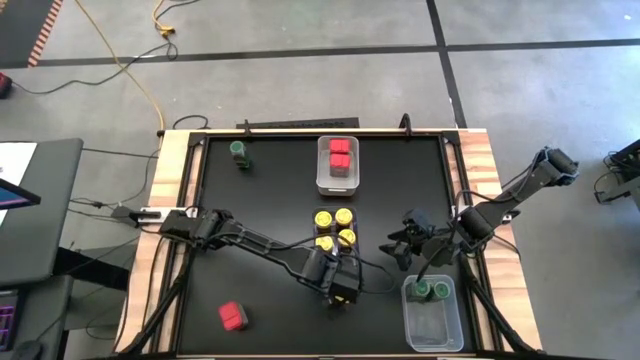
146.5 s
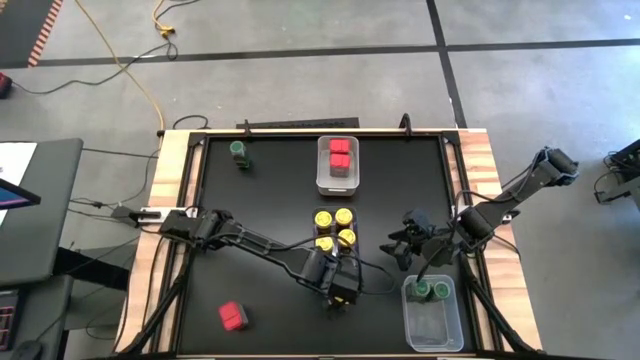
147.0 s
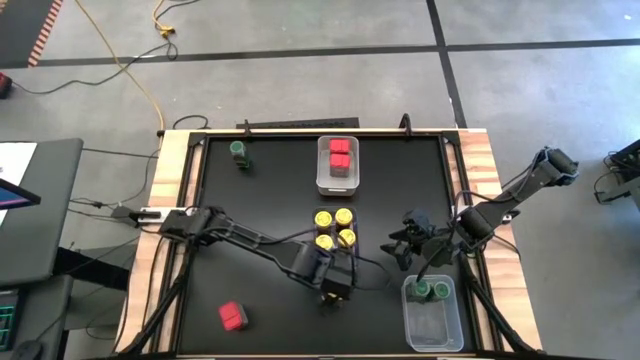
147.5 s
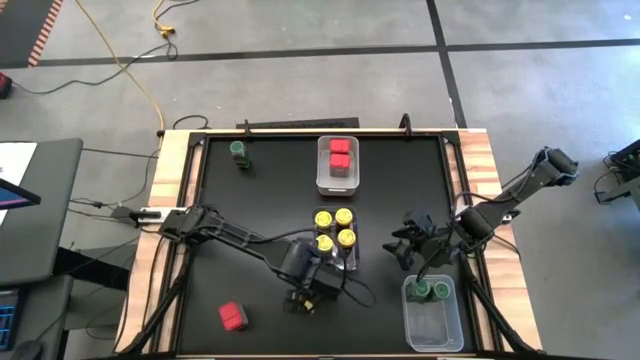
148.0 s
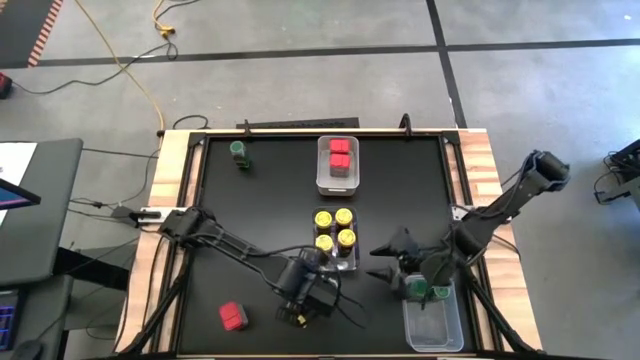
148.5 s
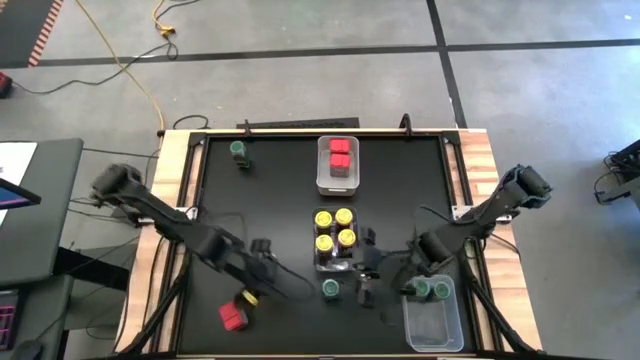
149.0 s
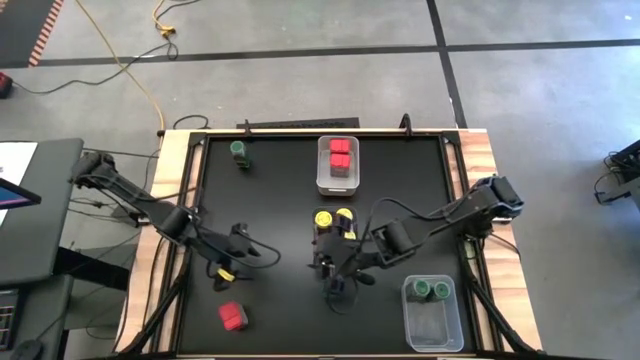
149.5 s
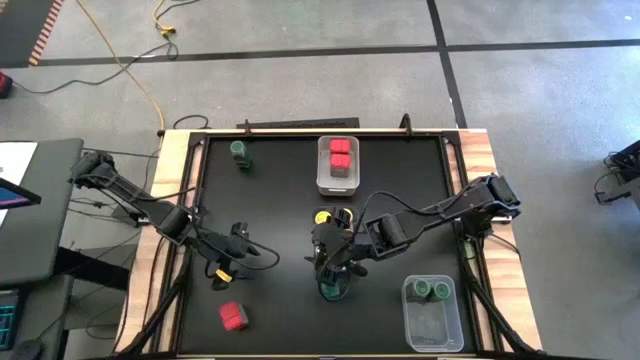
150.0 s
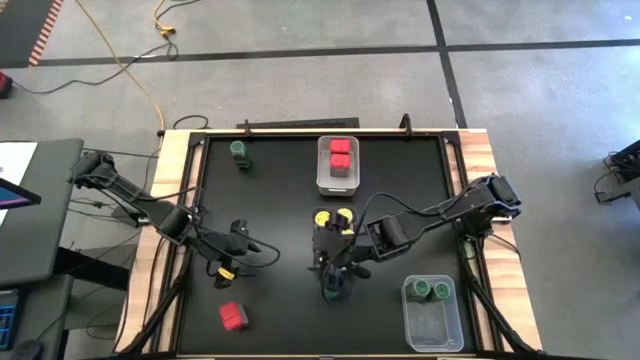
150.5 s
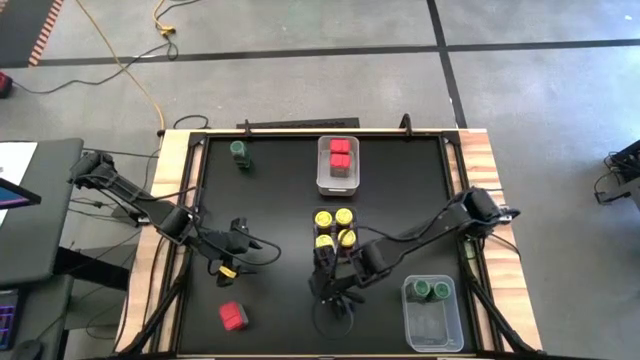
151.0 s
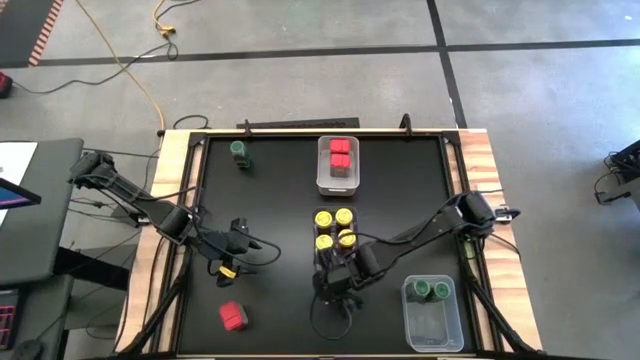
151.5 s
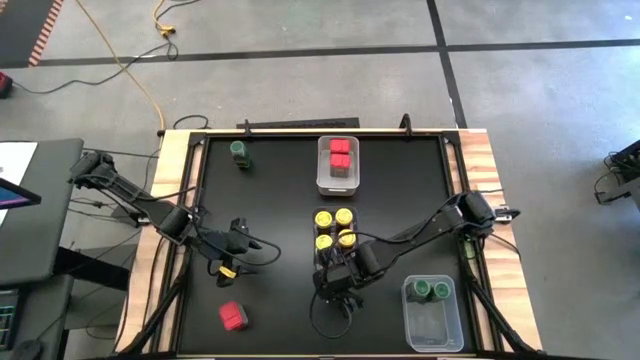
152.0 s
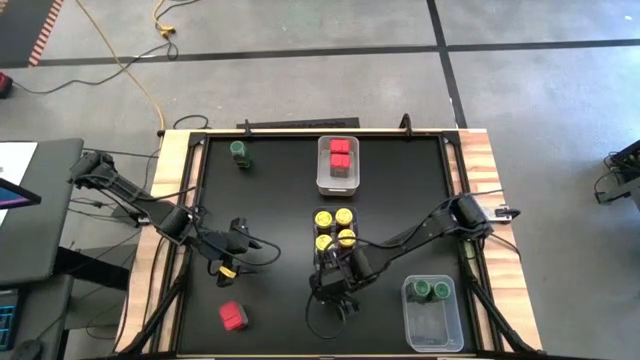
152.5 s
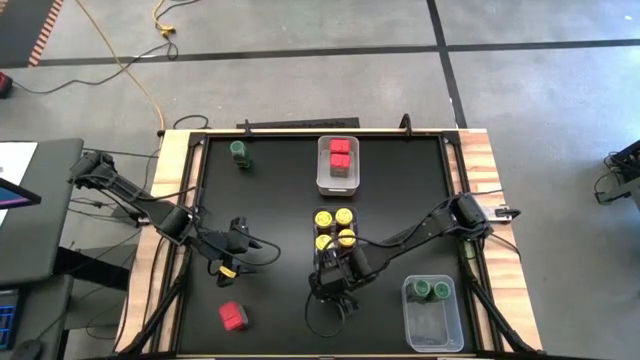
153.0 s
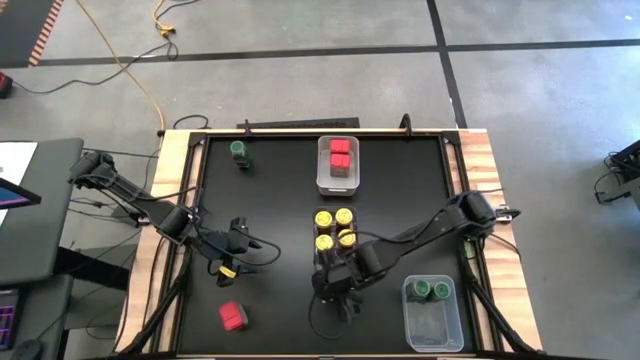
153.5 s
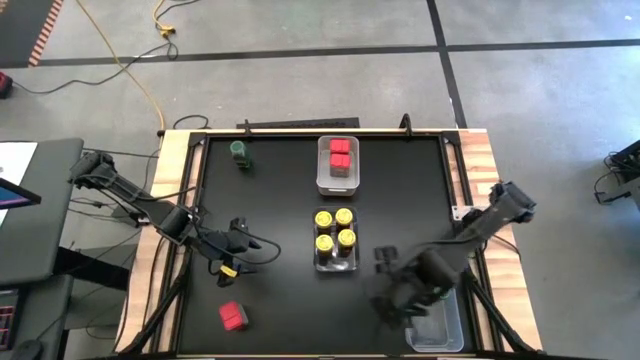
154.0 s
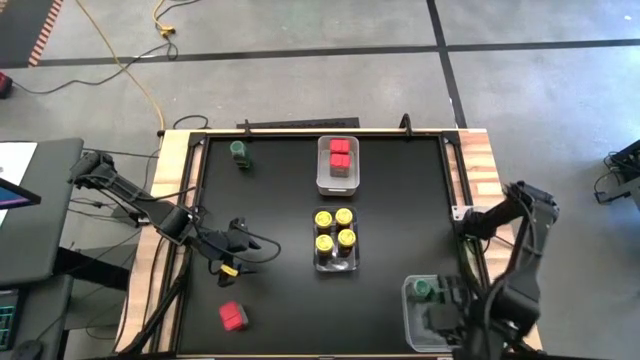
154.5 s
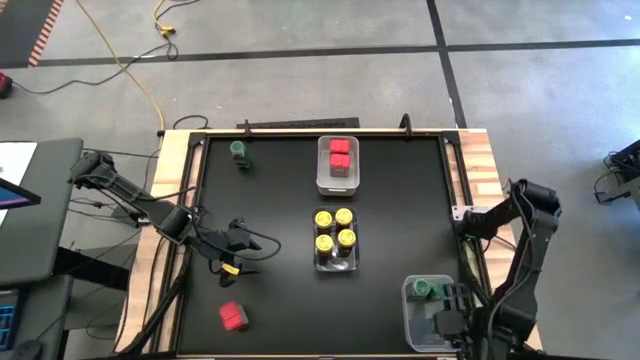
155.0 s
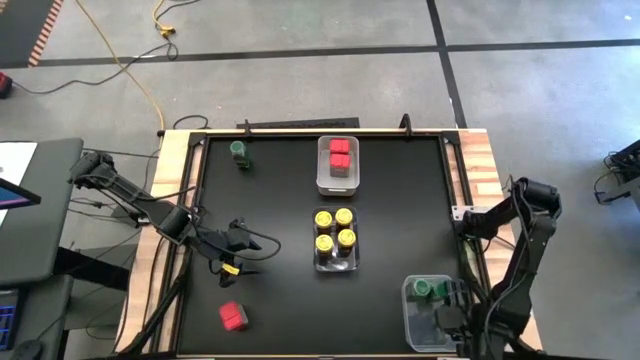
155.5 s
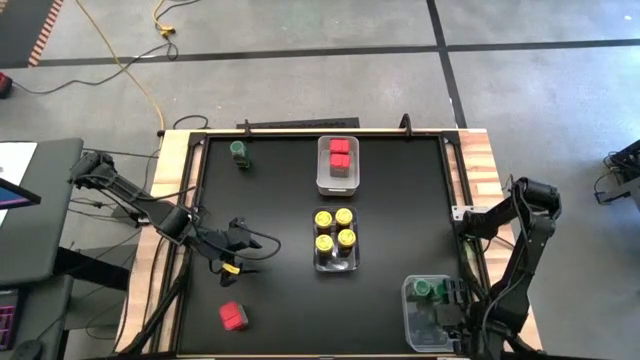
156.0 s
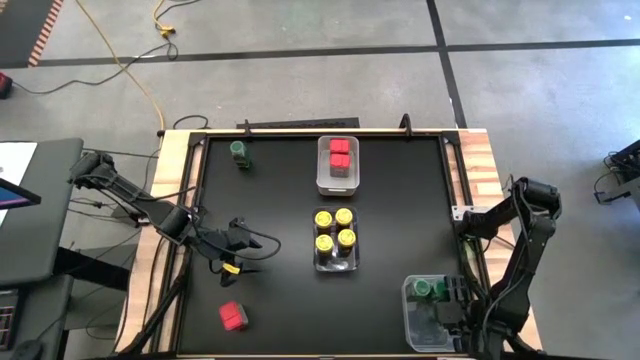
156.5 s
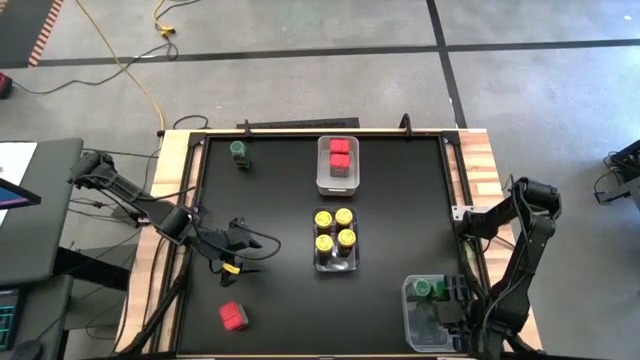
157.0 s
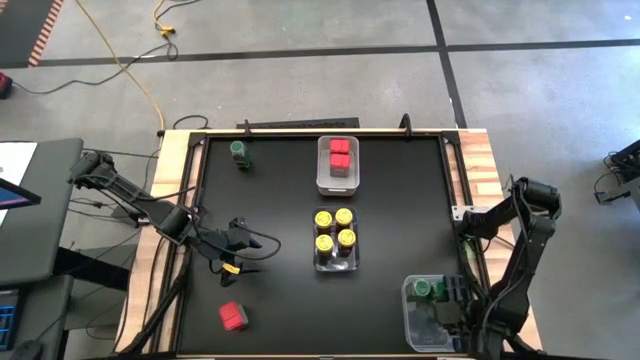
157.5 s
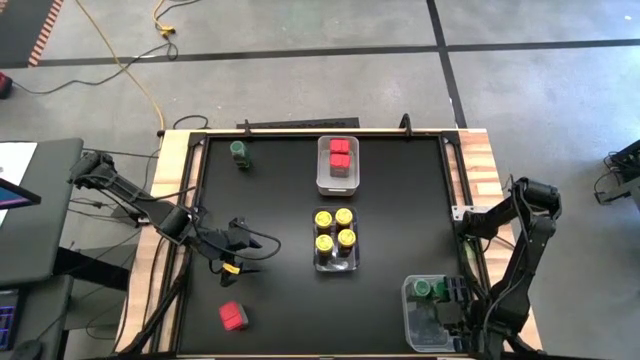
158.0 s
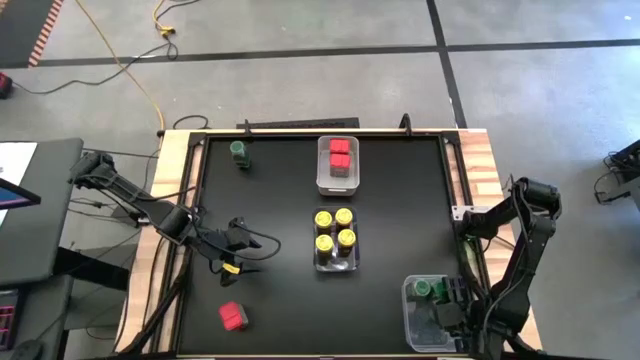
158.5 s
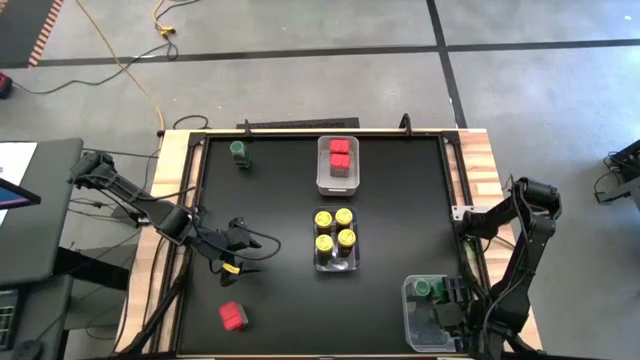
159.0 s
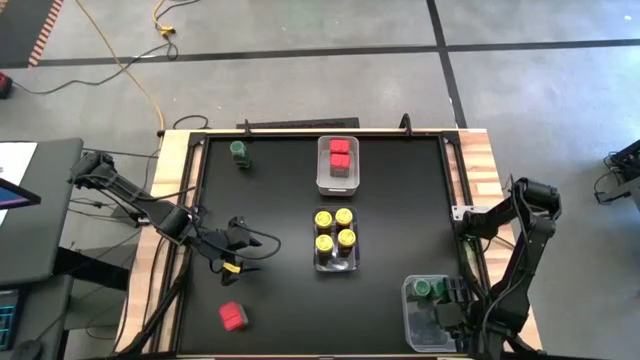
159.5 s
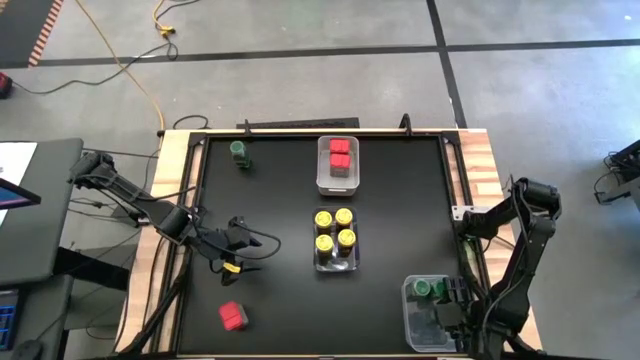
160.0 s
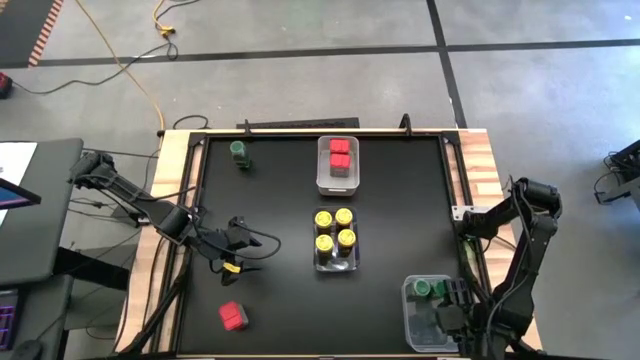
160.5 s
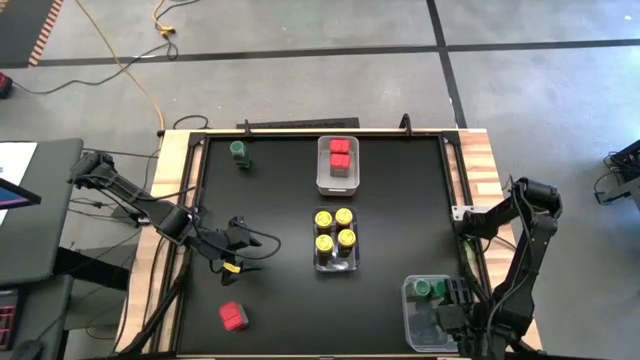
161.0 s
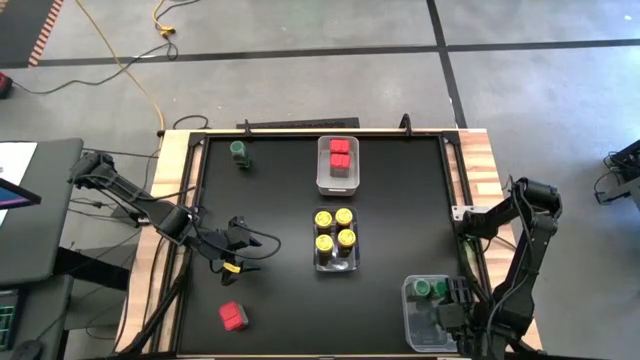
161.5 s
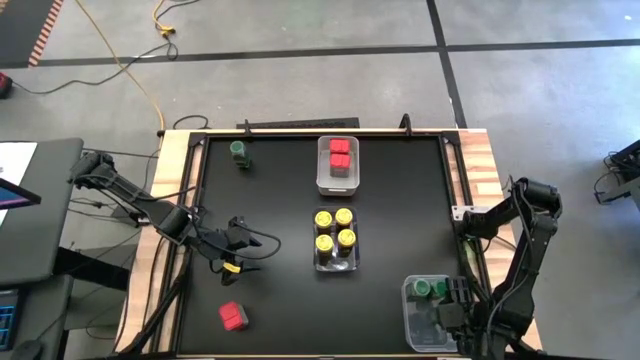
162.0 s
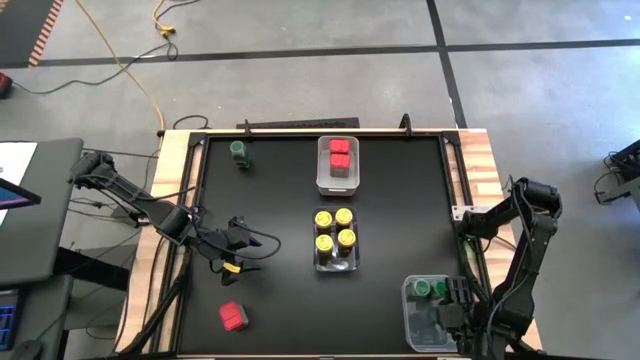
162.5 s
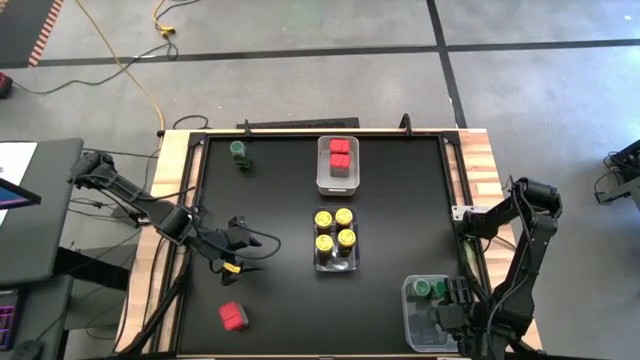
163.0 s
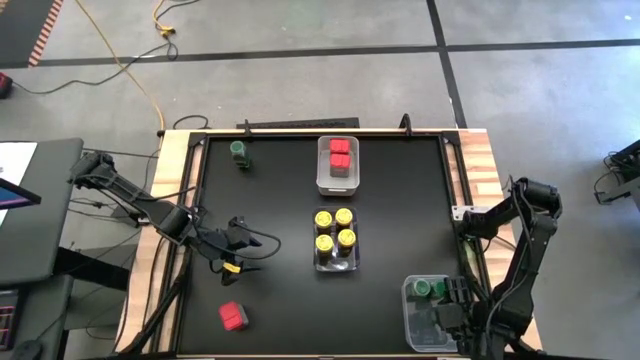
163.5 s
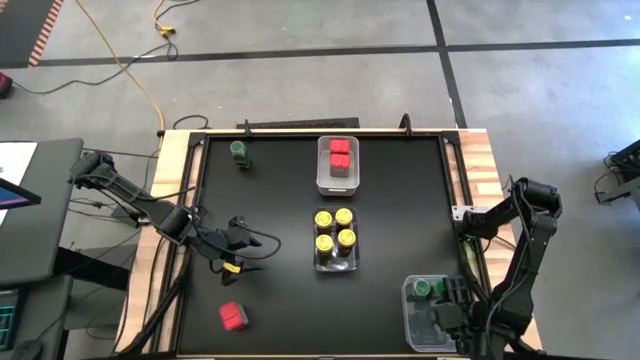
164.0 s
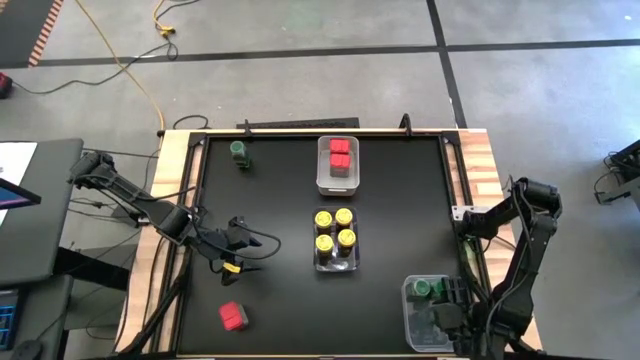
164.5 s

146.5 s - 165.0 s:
Task: Sort spices by type
Put the bottom green seasoning bottle into the transparent bin
